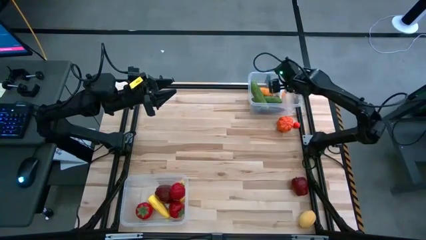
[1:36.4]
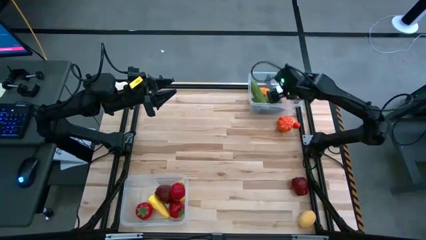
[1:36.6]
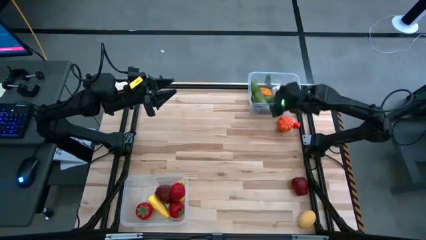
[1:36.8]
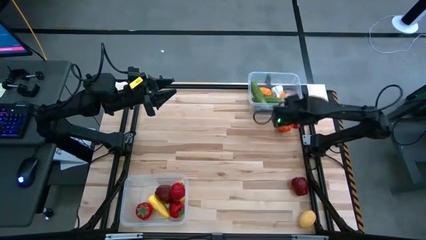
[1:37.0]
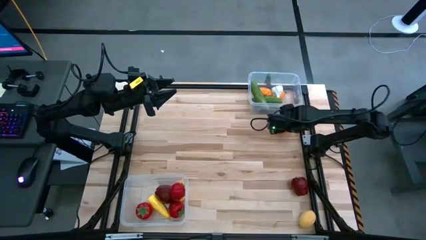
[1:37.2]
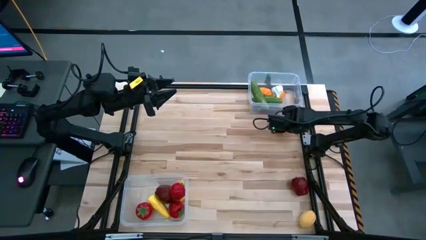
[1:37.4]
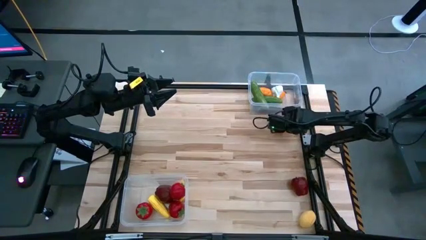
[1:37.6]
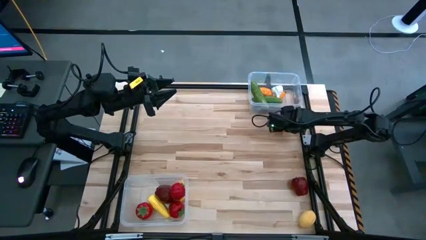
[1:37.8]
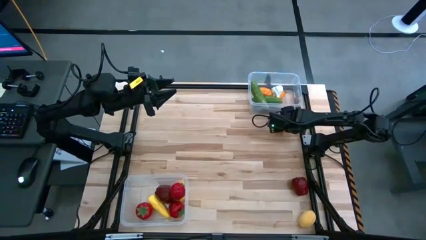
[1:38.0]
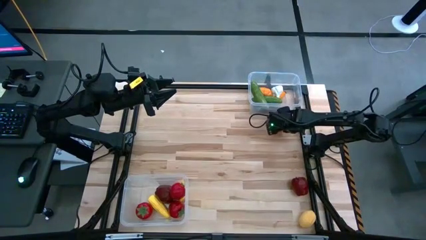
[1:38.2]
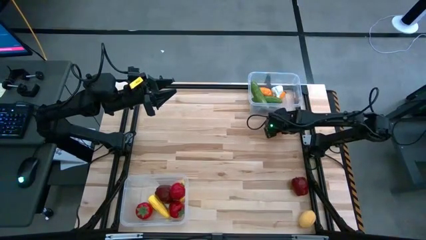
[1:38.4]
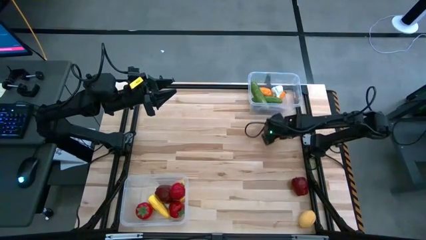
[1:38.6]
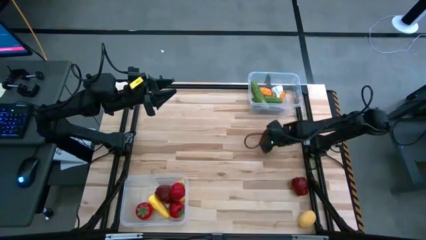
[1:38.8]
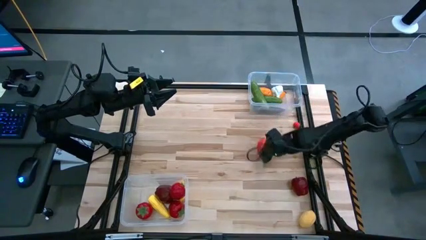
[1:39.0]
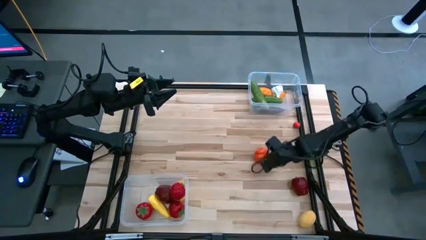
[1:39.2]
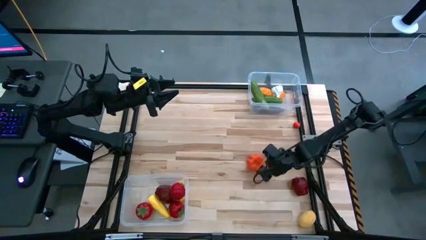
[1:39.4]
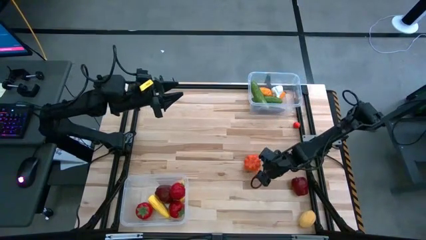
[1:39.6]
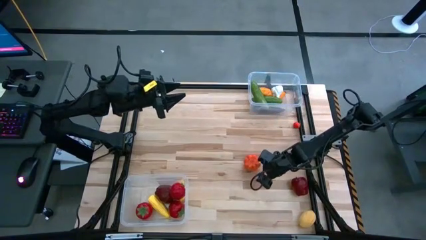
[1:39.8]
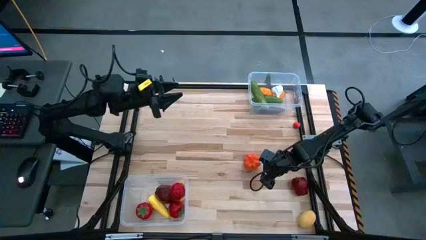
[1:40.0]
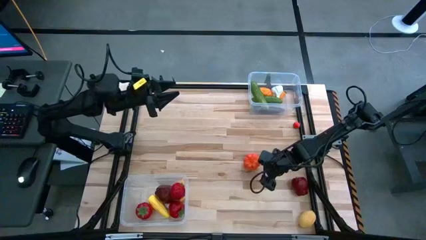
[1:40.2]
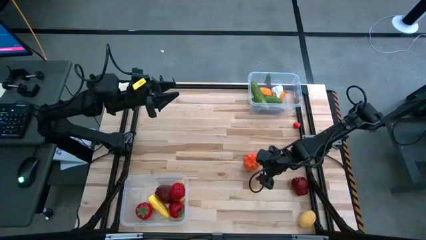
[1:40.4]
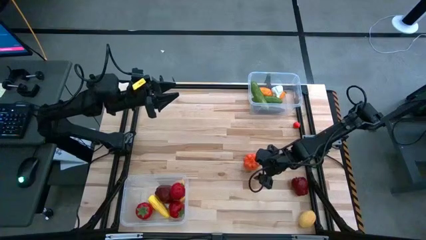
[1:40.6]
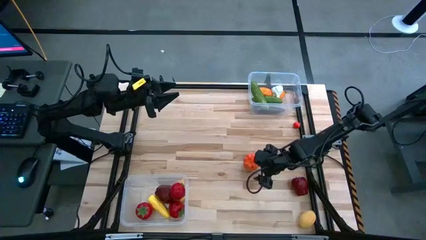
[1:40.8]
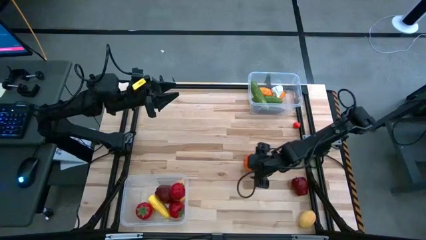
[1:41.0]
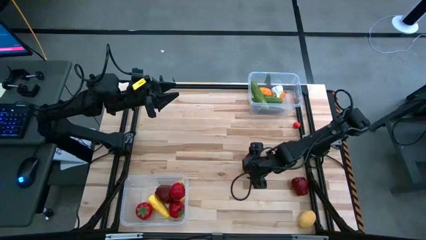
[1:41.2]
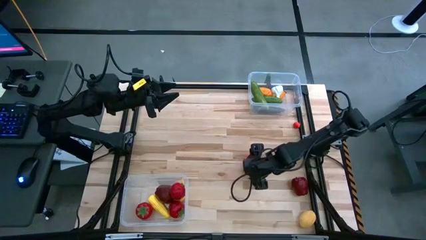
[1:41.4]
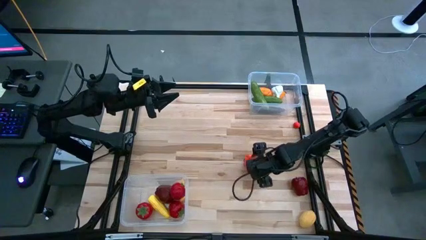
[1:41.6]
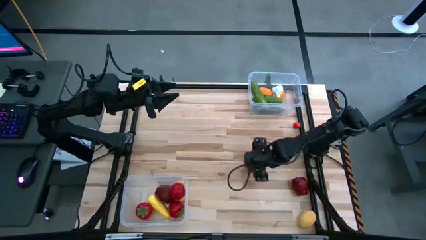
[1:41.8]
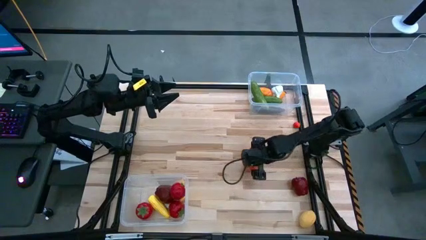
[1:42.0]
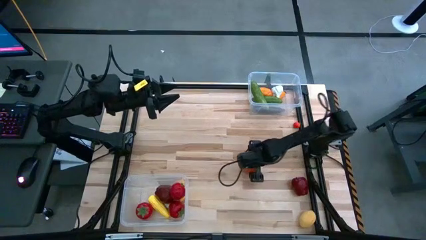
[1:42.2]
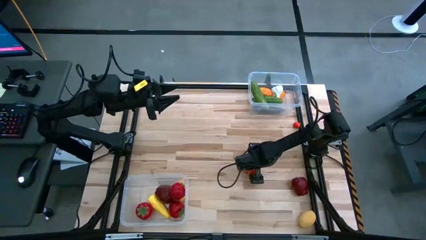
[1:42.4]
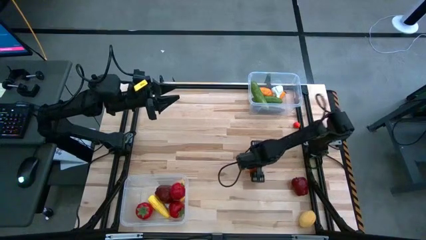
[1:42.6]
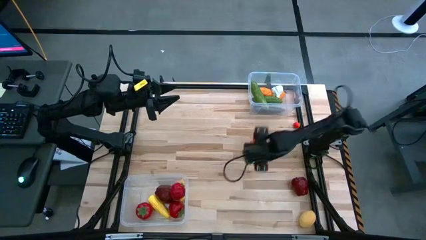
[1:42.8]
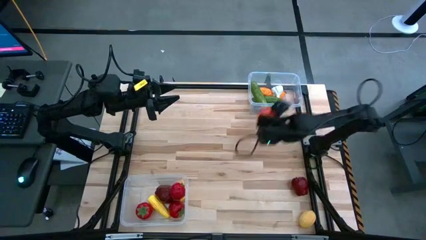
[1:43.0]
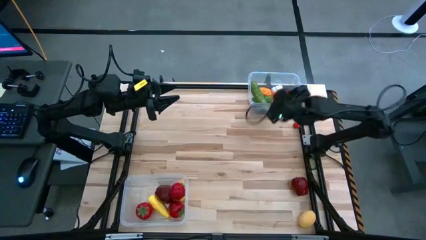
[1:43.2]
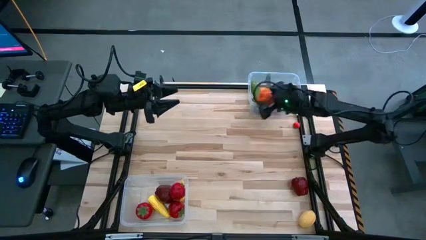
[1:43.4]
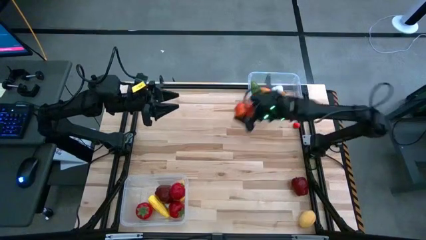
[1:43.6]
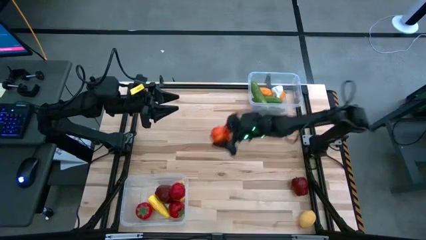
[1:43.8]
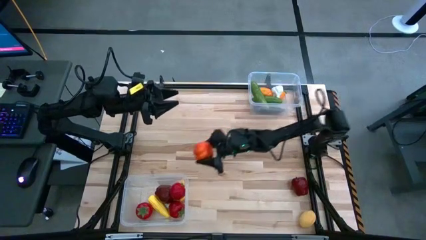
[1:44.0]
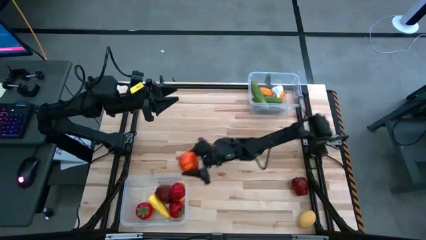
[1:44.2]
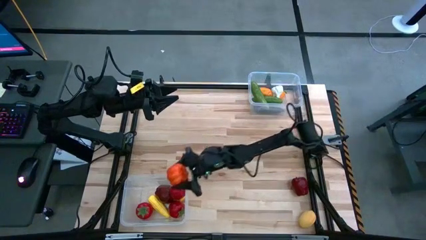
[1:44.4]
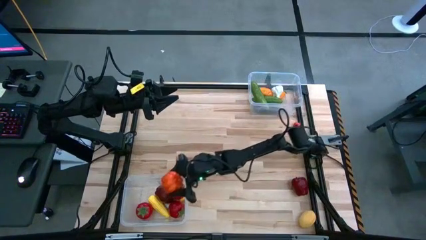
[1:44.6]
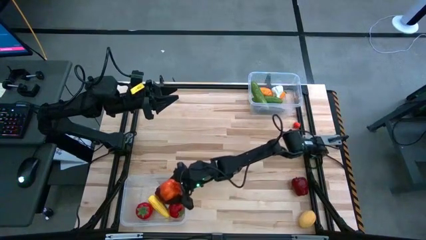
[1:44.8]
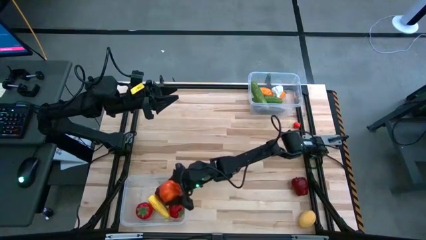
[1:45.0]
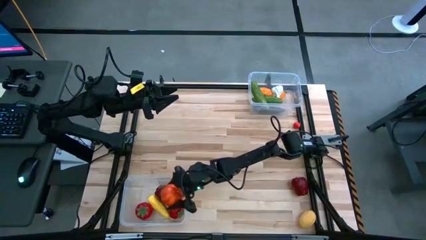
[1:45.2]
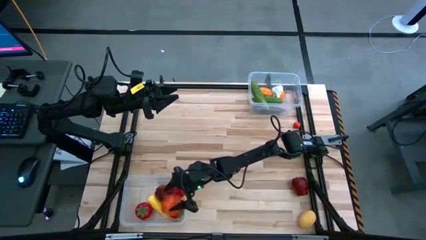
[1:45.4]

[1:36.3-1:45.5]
Task: Sort produce into baskets
Put the orange pumpkin into the bottom transparent bin

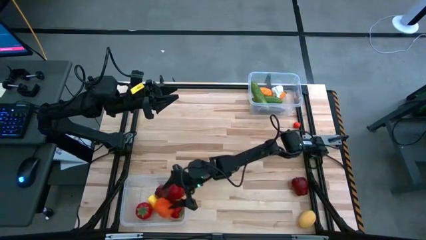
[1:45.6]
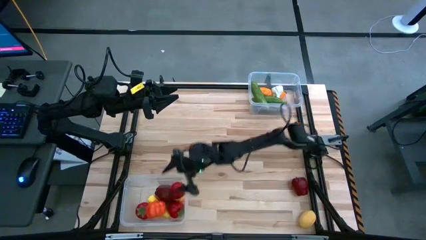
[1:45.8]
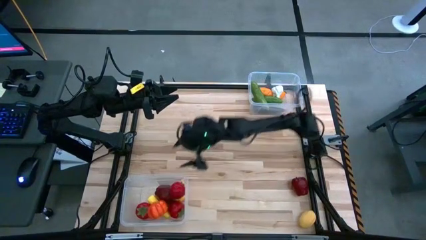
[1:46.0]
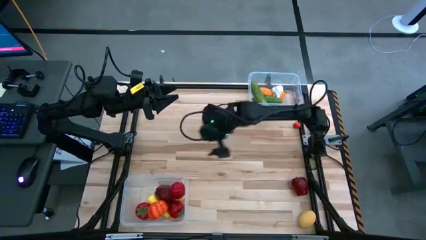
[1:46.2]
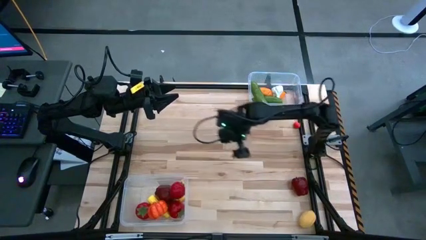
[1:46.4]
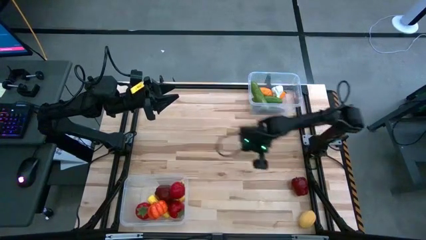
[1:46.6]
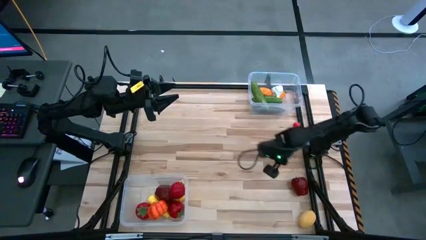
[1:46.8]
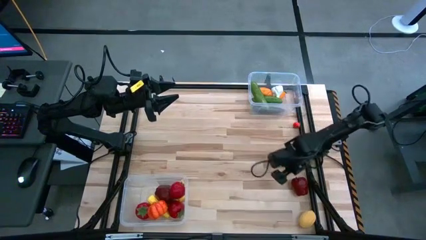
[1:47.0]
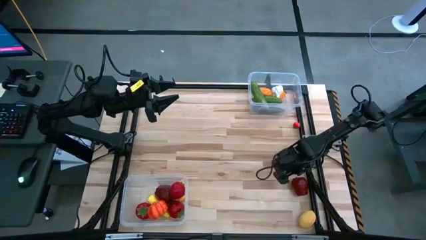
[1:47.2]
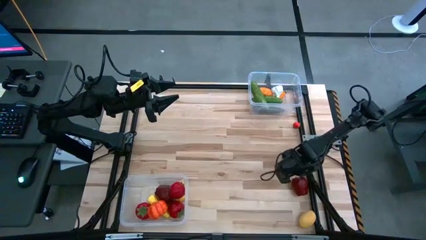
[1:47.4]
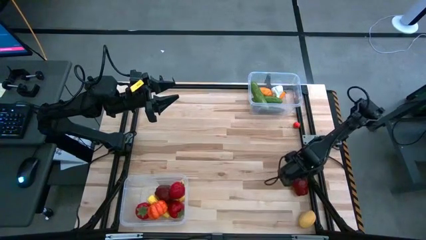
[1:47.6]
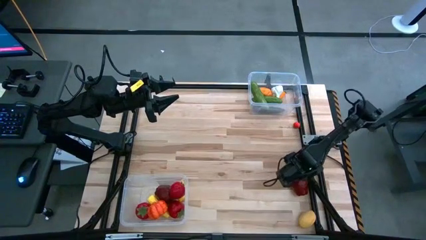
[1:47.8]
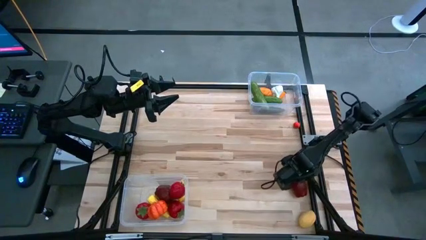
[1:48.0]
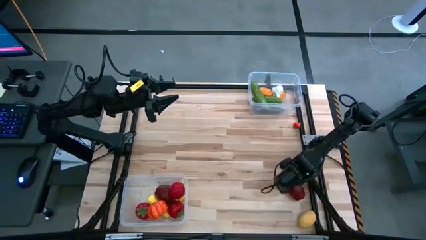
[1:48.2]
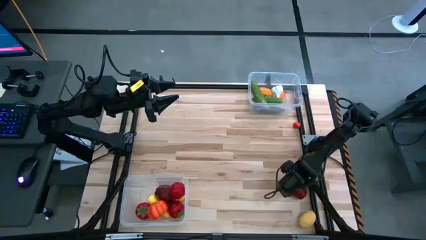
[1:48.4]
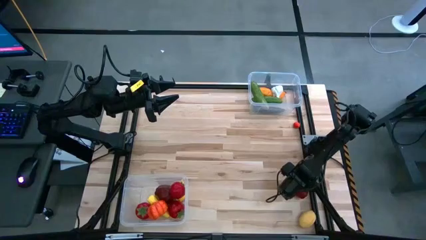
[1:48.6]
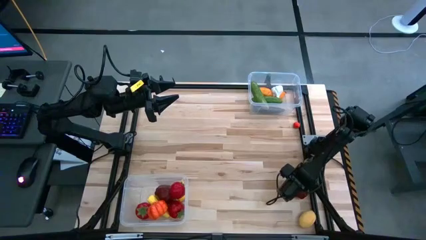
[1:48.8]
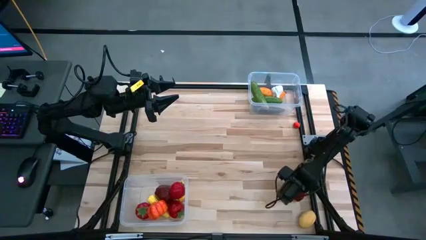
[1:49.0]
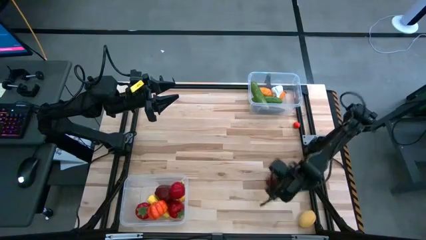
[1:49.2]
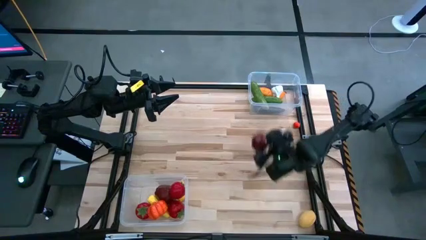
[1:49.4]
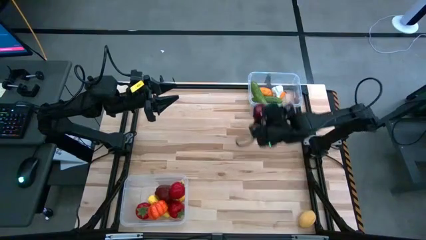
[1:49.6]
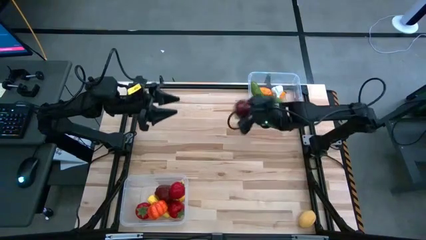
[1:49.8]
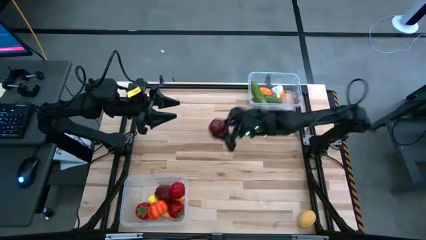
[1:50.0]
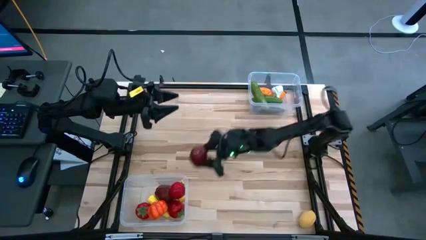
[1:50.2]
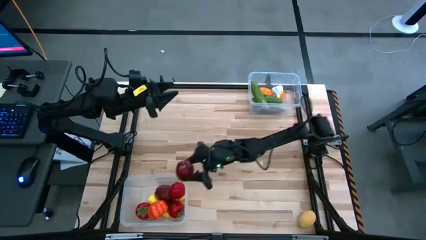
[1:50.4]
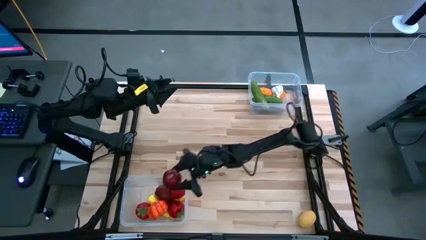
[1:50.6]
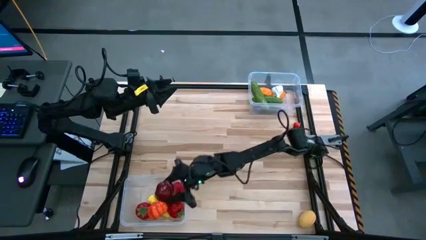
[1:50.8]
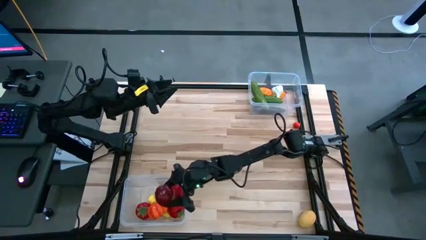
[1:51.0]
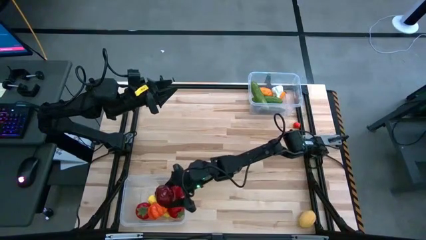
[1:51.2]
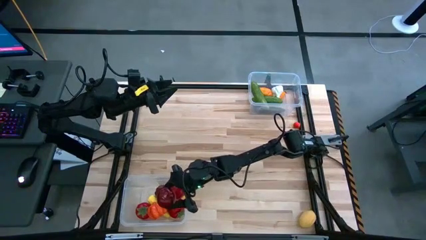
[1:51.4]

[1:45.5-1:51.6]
Put the red apple into the bottom transparent bin
